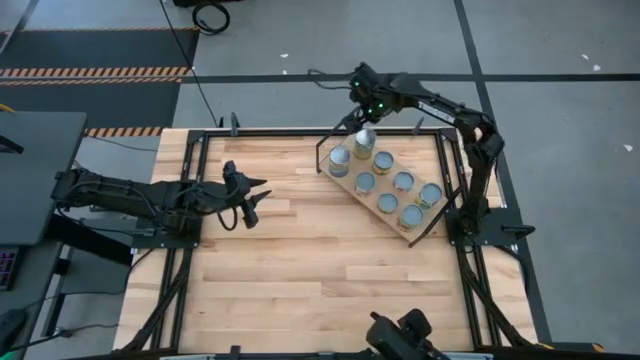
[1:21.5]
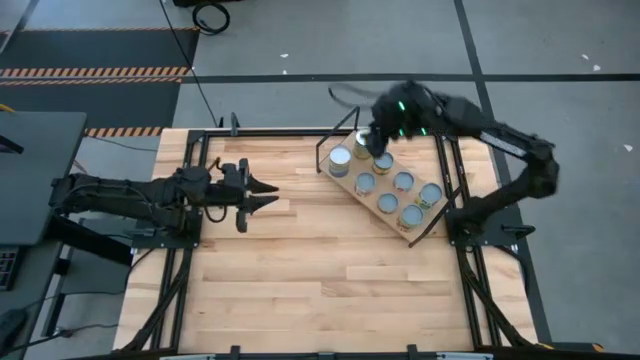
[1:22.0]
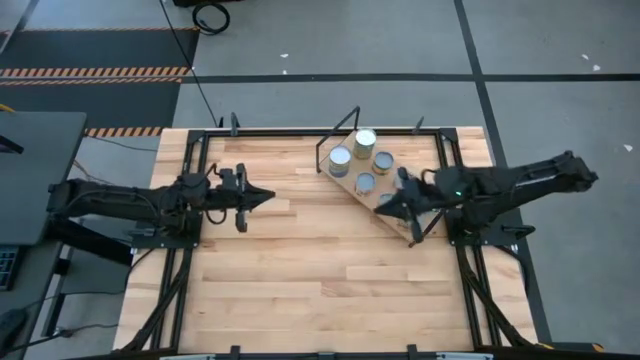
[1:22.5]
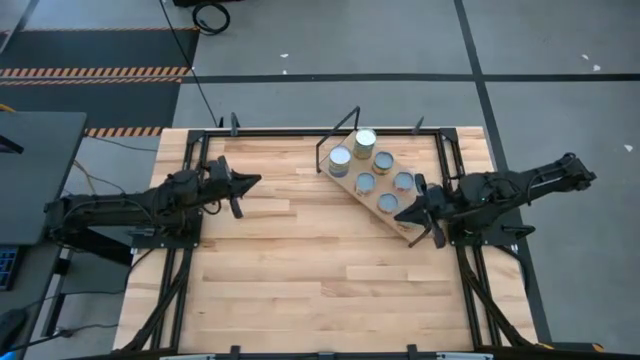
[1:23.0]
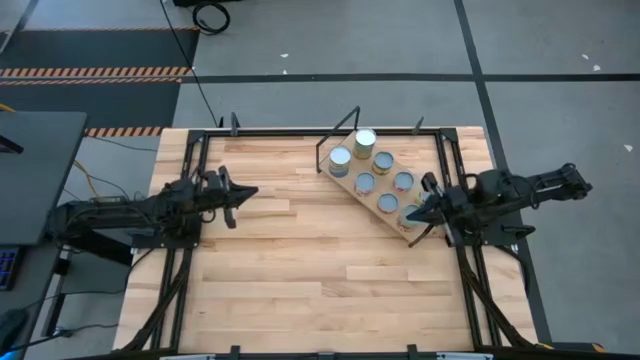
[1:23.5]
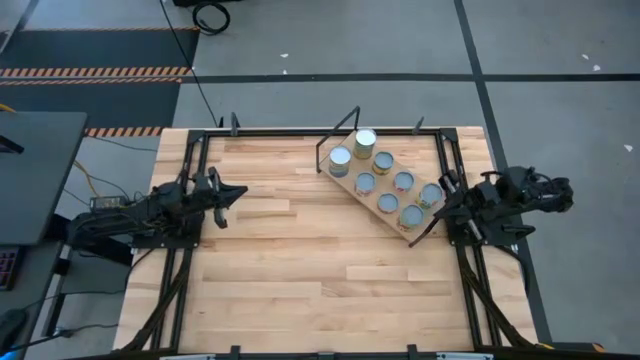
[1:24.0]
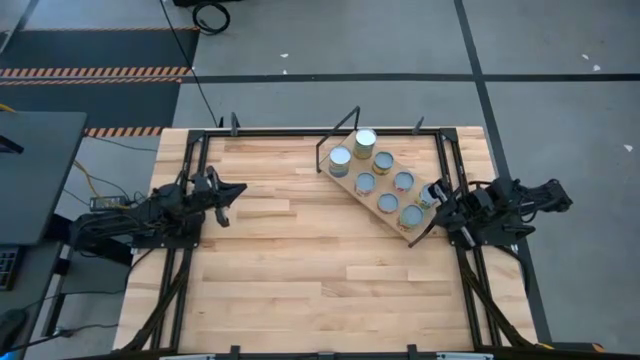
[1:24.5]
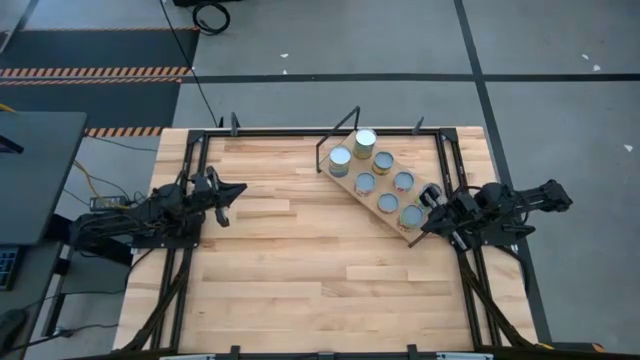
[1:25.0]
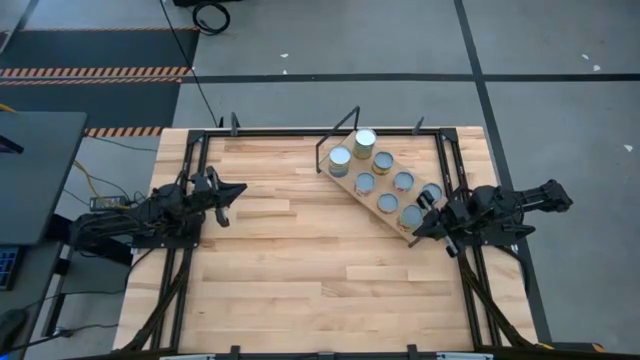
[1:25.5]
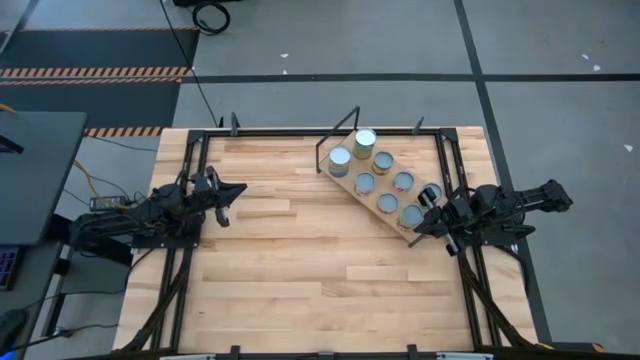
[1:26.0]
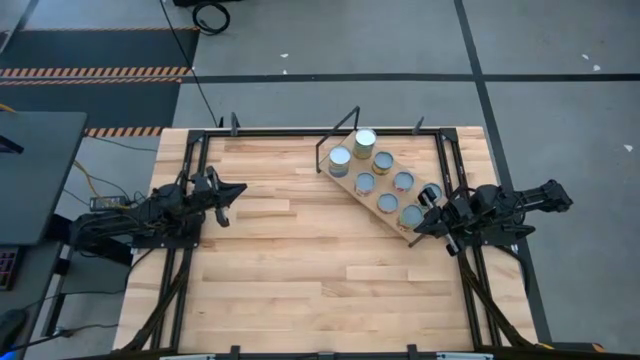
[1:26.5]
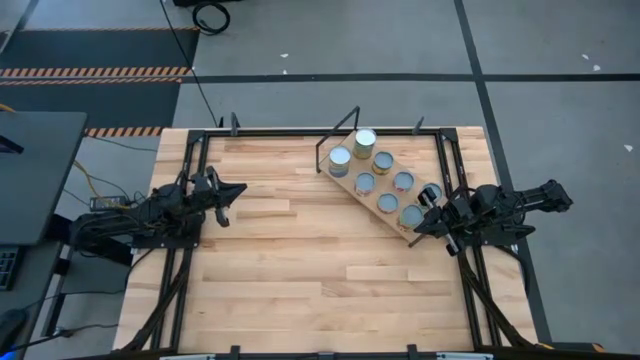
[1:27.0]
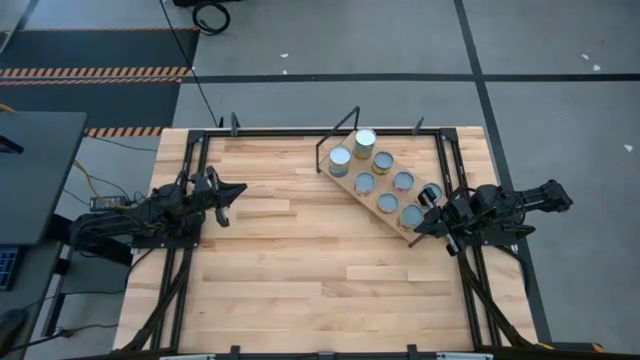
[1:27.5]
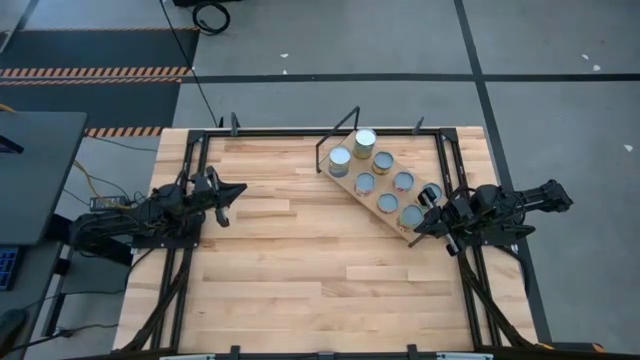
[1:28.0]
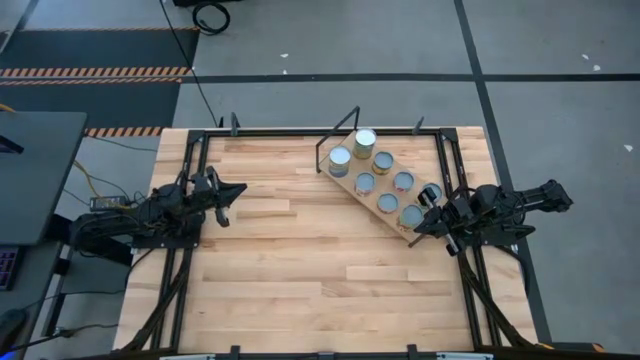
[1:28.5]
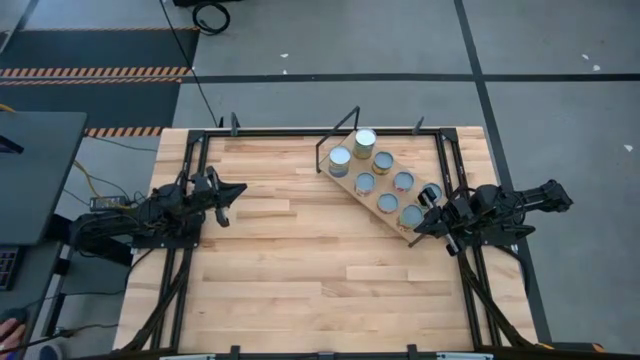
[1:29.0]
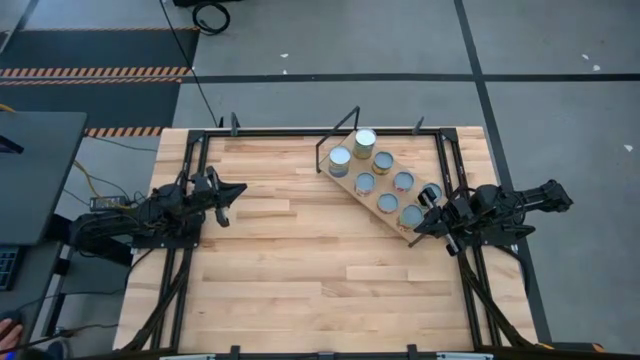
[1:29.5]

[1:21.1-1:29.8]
Task: Pick and place cans onto a shelf
Return to Home Position

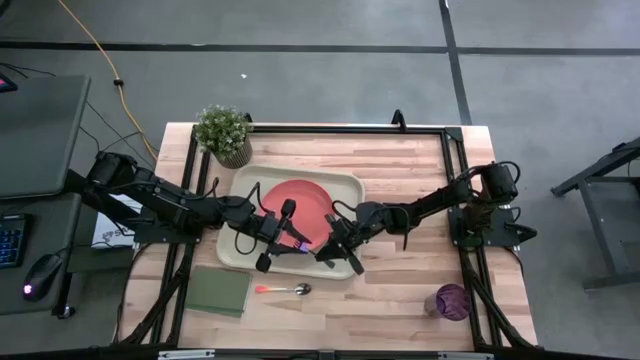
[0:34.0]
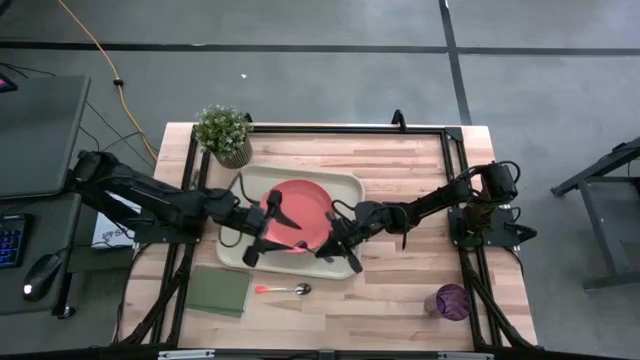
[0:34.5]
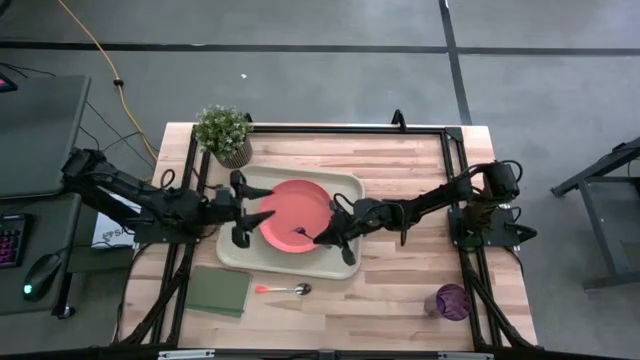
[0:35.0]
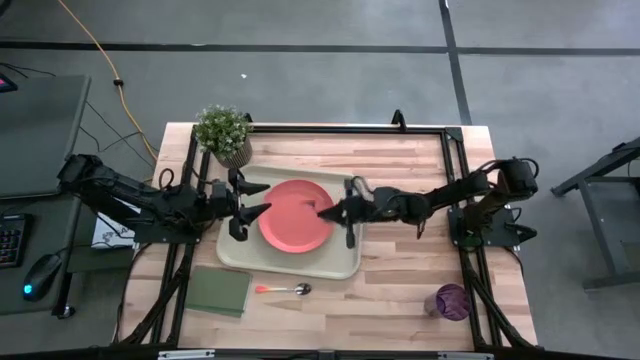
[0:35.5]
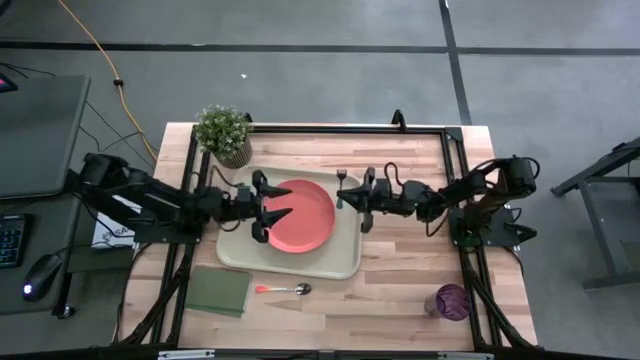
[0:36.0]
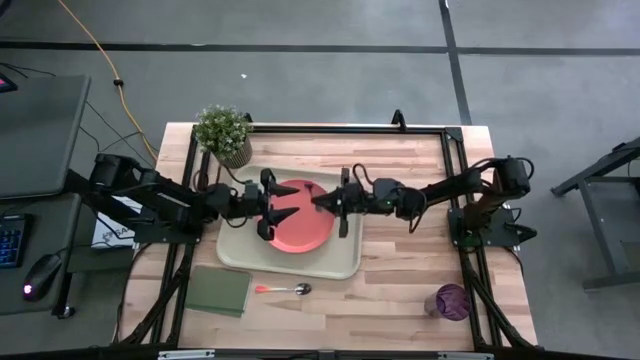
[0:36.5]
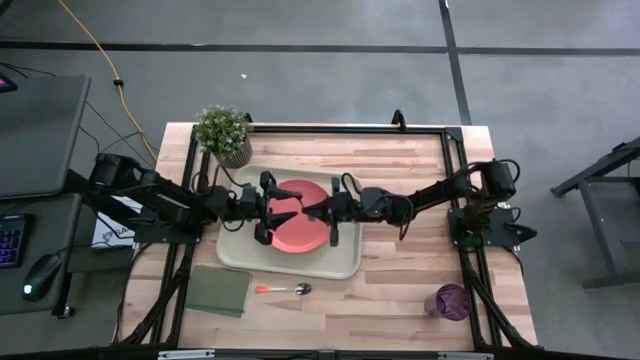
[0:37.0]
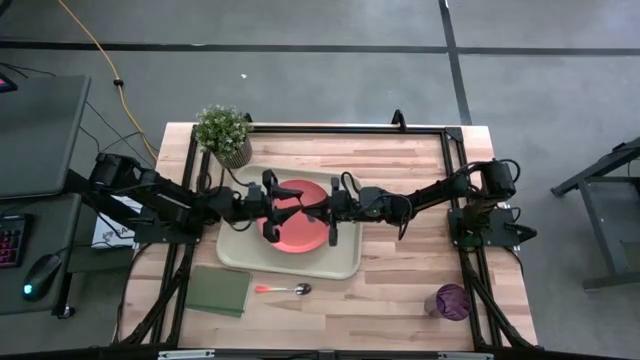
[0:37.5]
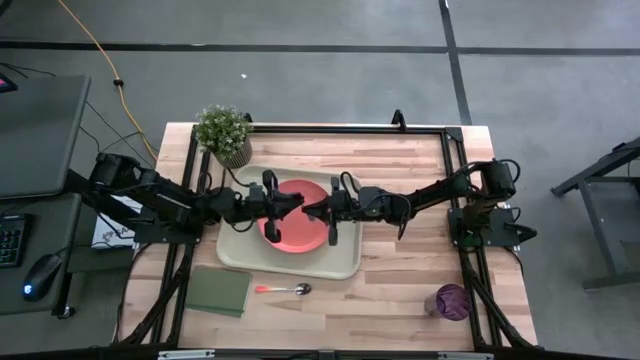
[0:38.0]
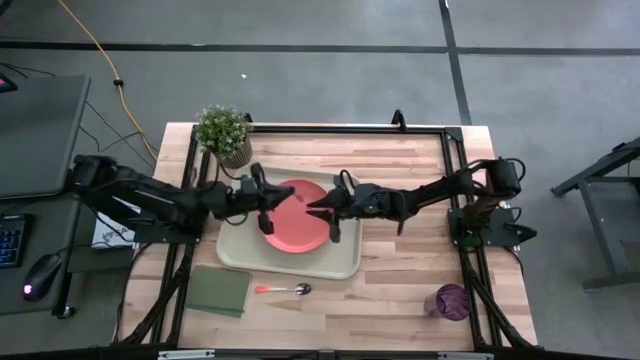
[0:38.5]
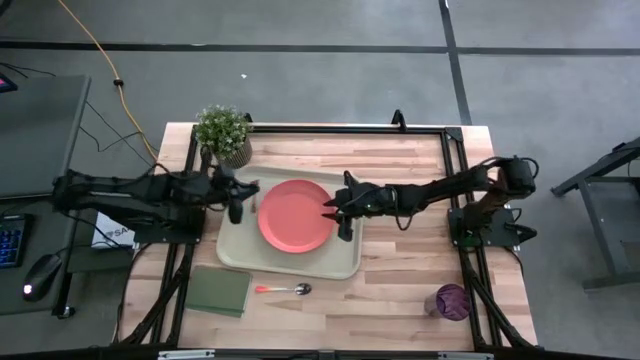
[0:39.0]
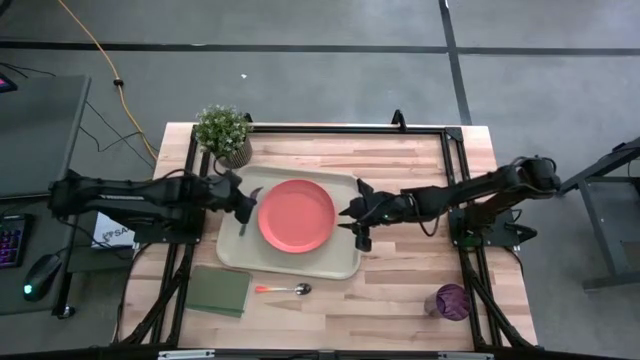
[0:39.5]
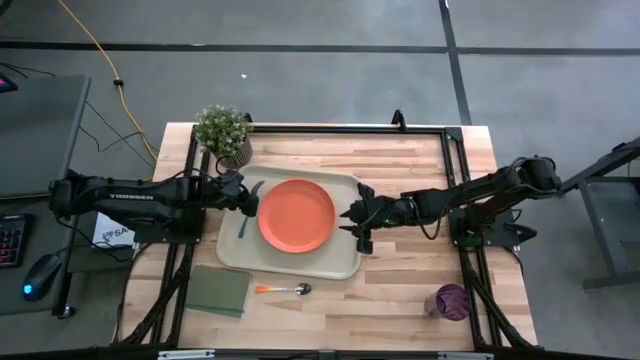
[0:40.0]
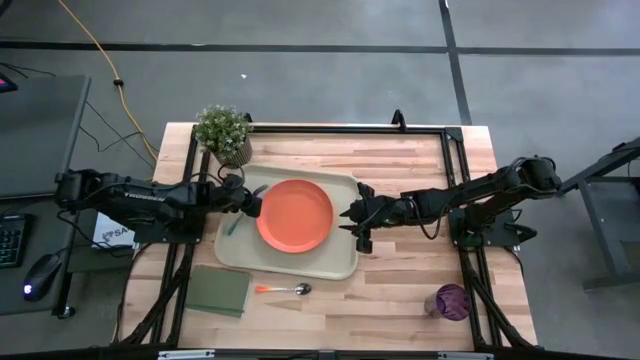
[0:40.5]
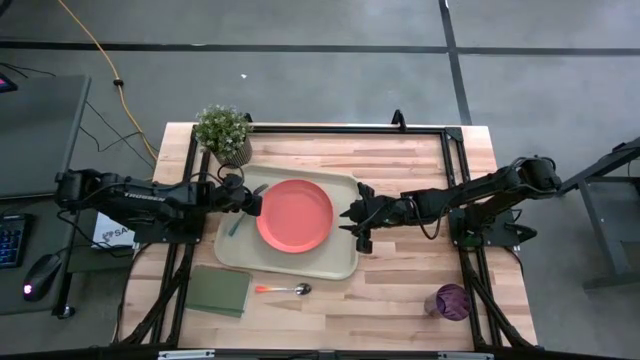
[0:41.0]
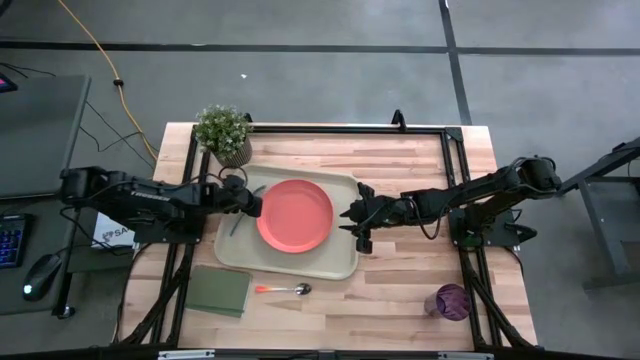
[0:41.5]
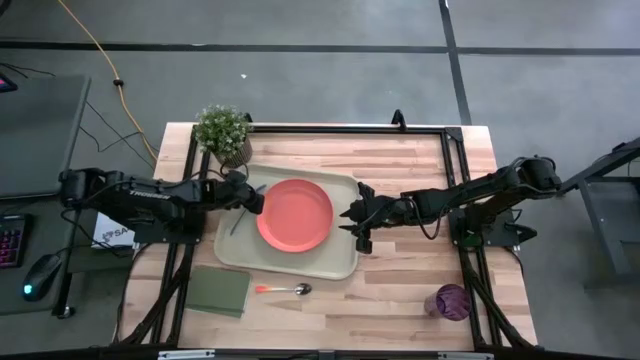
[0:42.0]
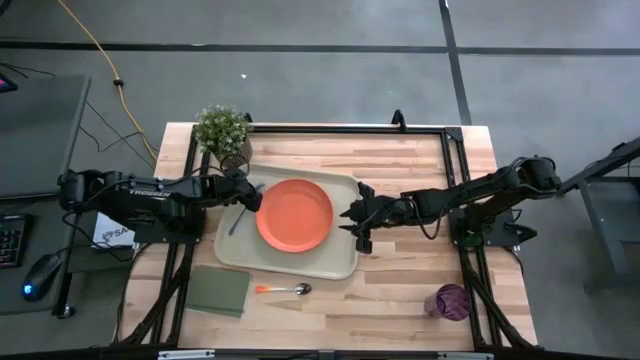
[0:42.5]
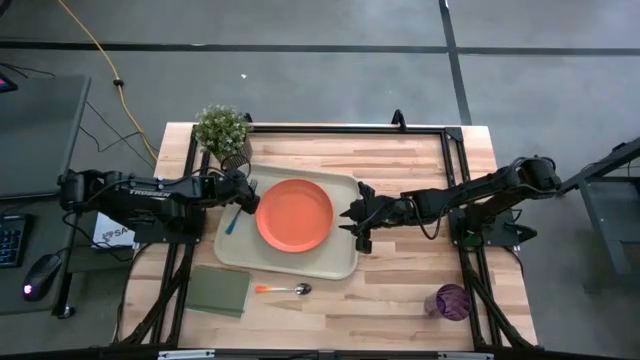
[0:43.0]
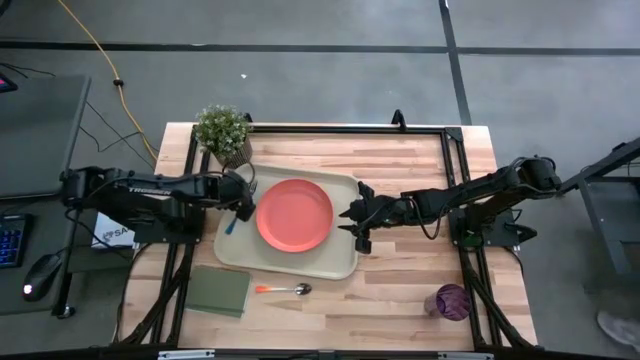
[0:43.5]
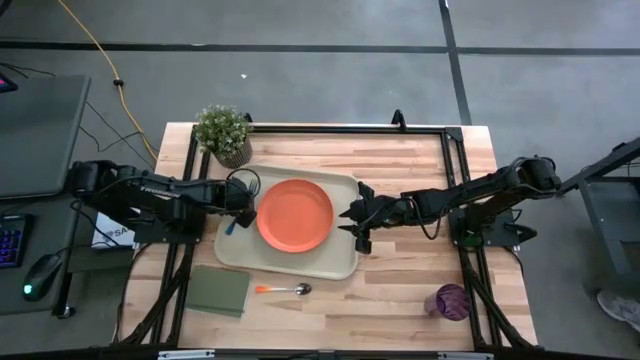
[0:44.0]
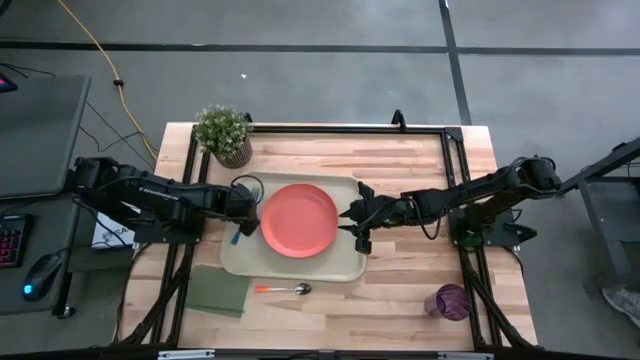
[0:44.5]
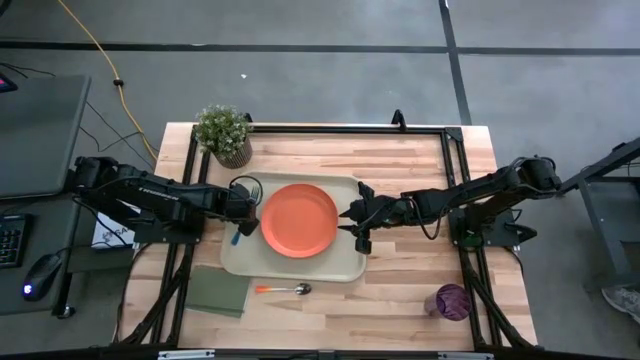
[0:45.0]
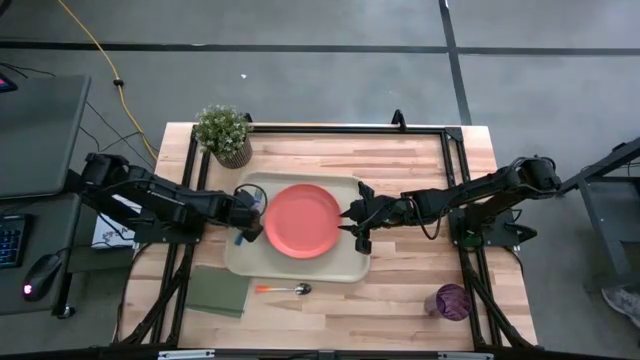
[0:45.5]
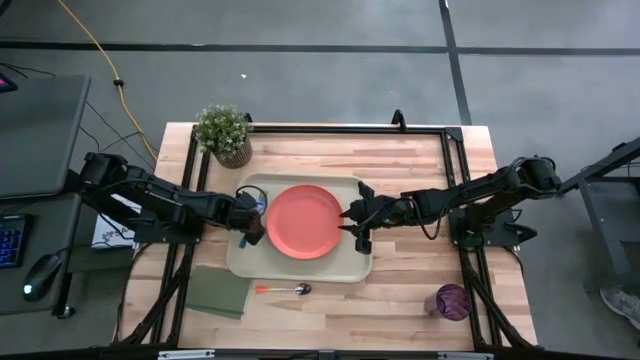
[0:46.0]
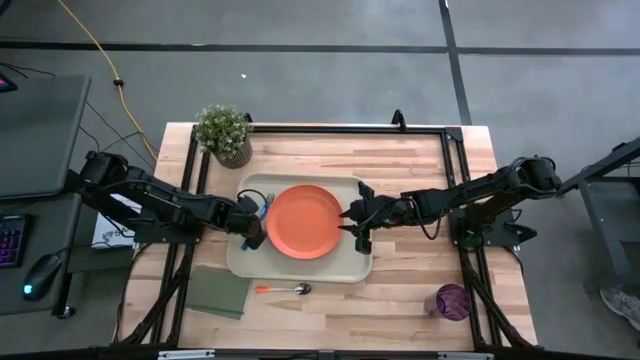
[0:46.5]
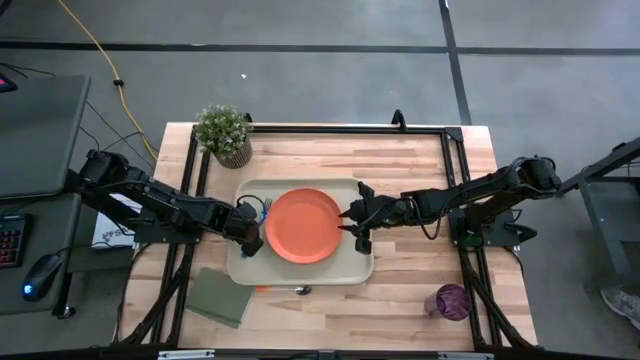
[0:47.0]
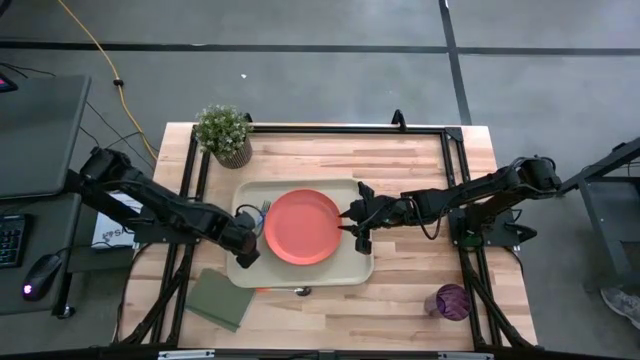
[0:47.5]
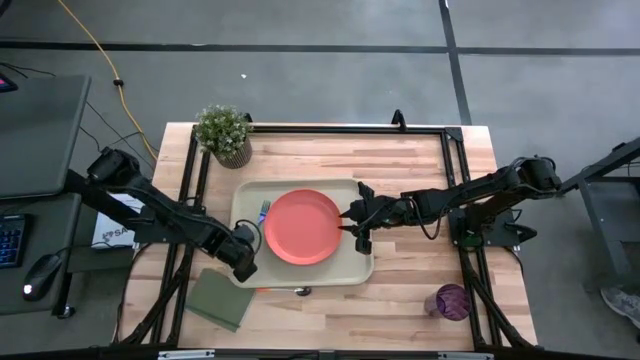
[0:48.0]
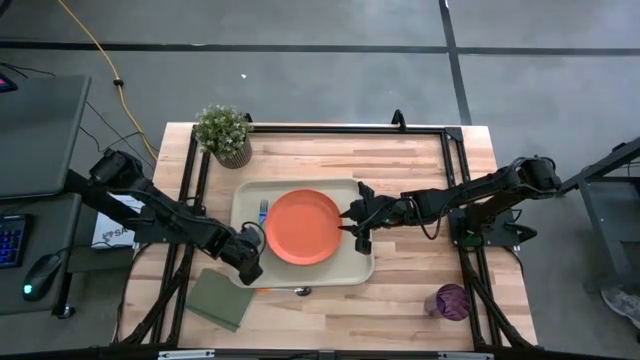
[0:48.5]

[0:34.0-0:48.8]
Task: Pick and place plate/cup/fork/spoon on tray
Put the blue fork on the left side of the gray tray
